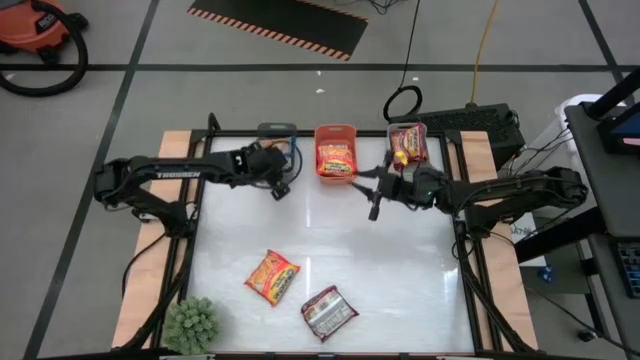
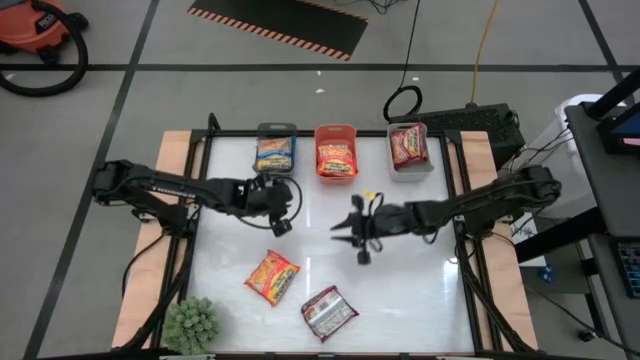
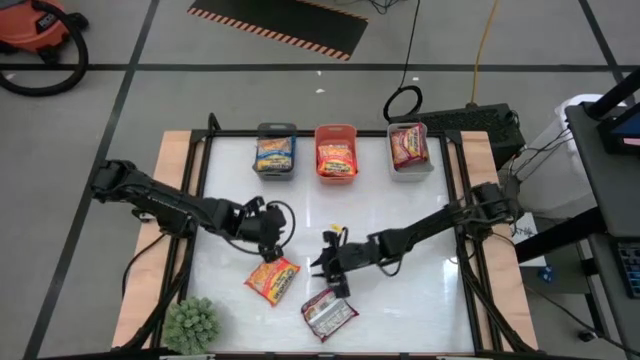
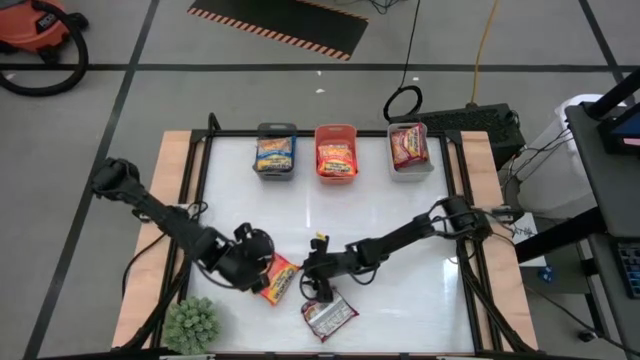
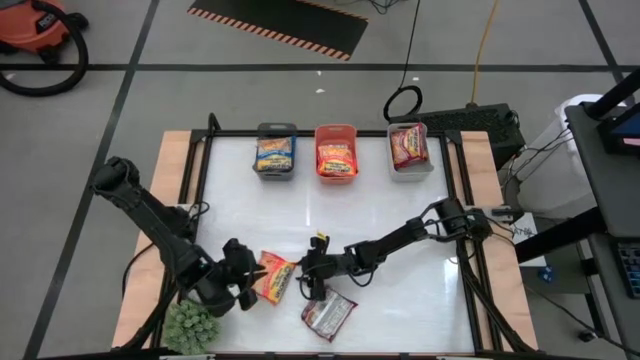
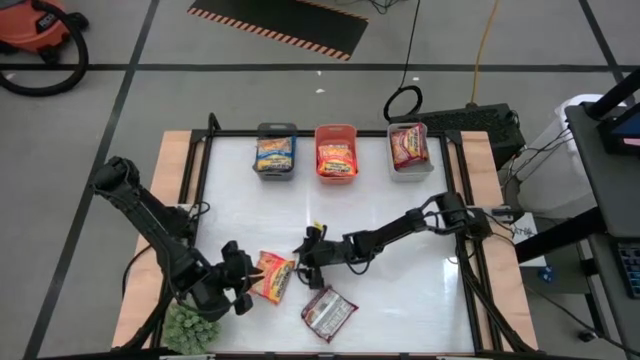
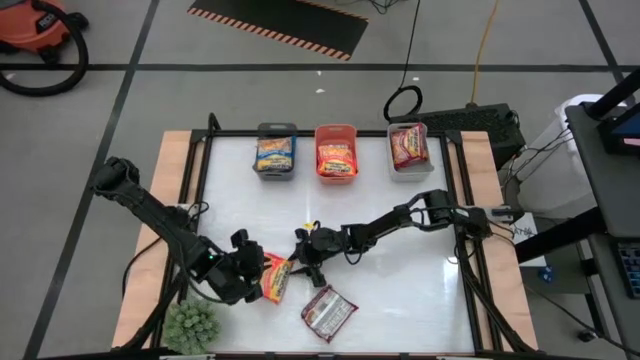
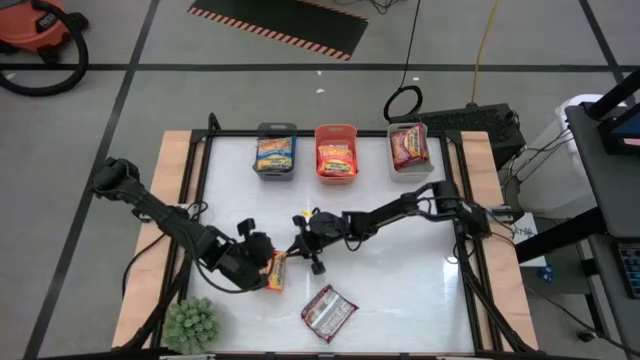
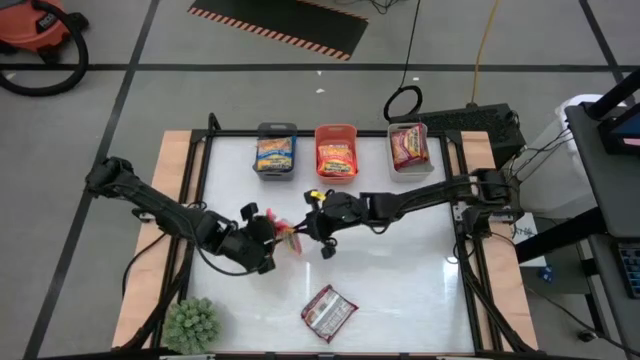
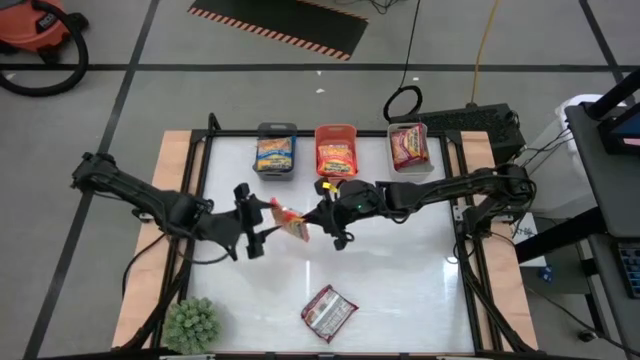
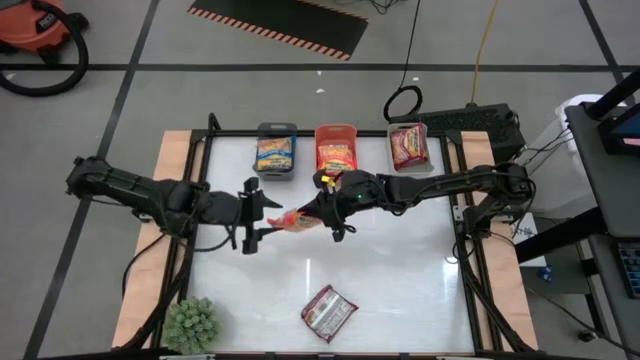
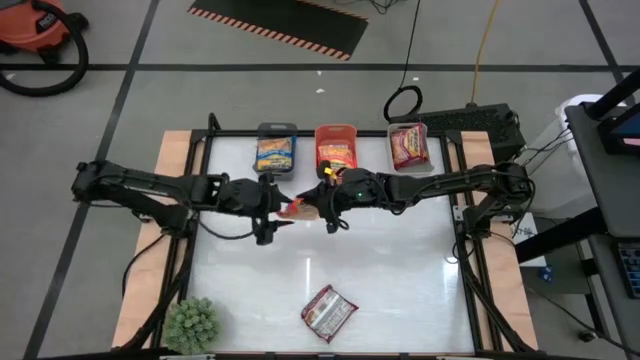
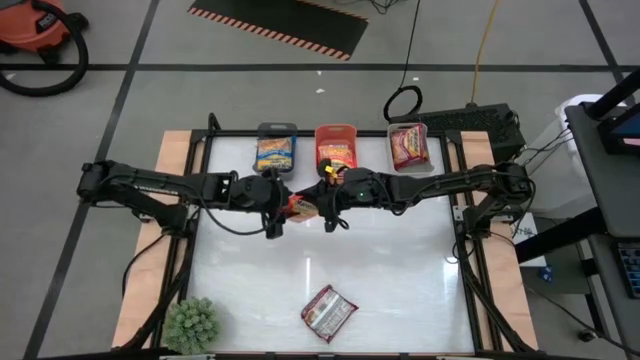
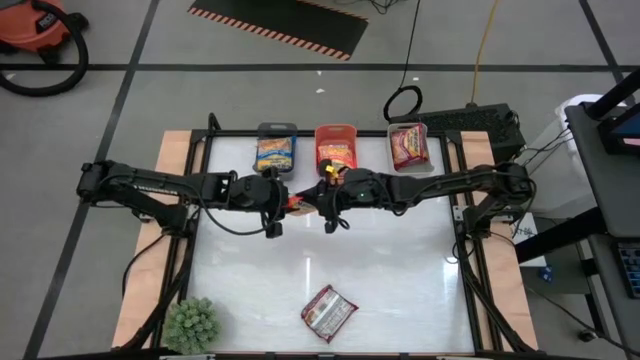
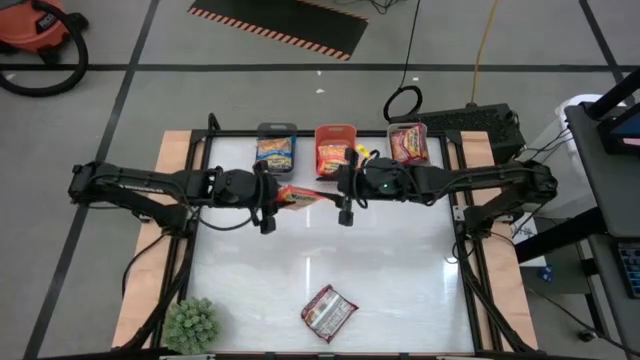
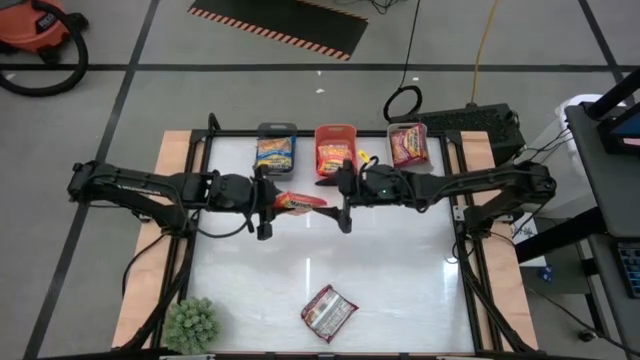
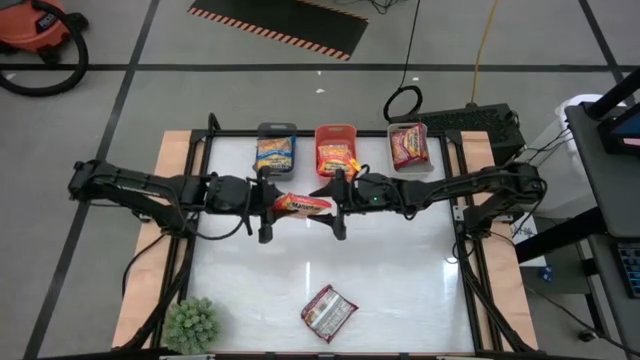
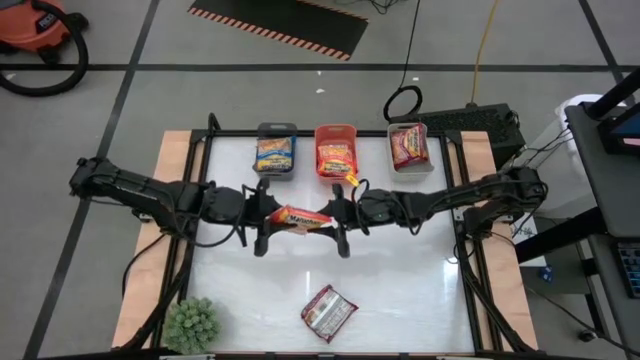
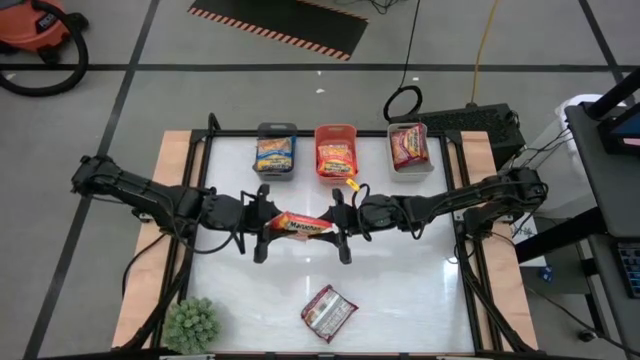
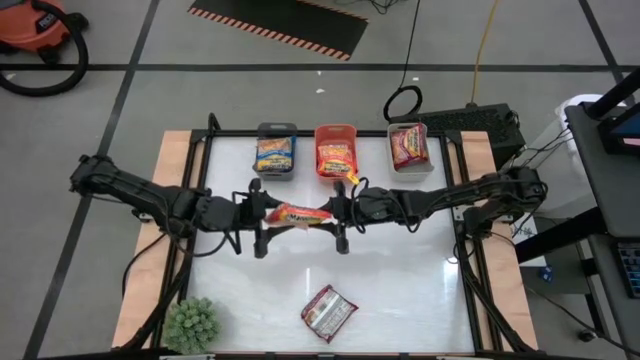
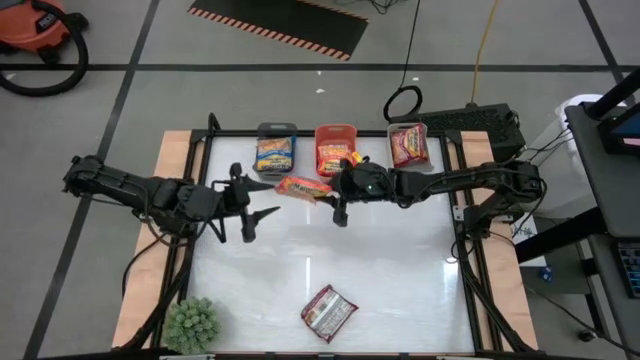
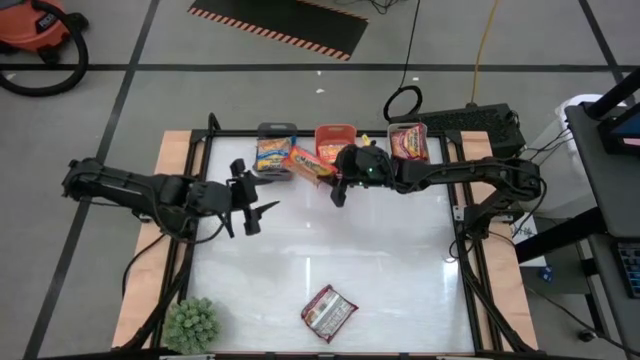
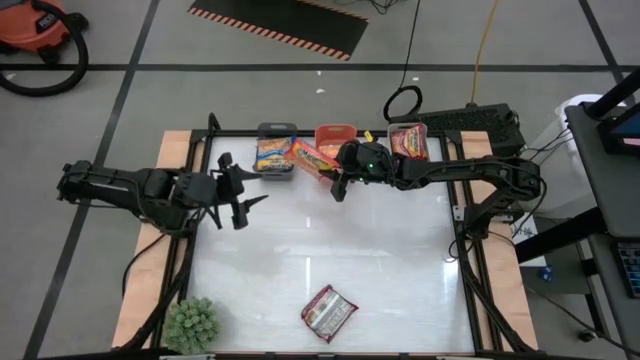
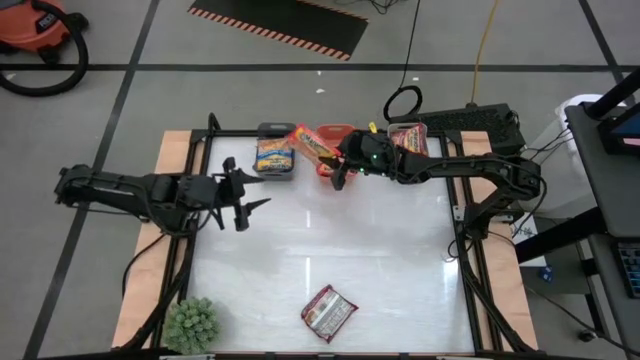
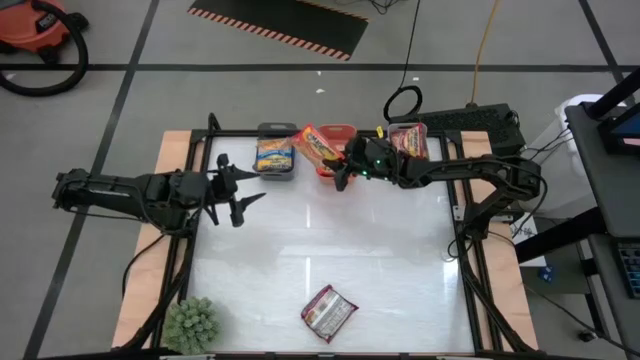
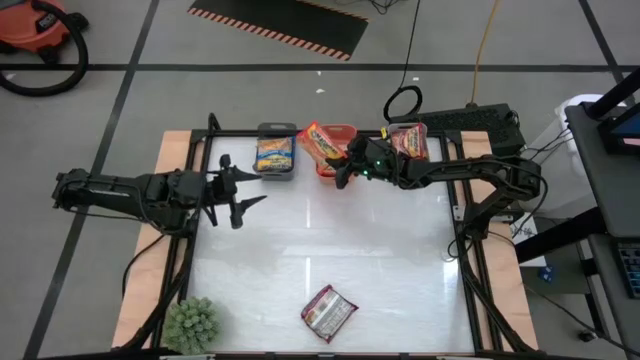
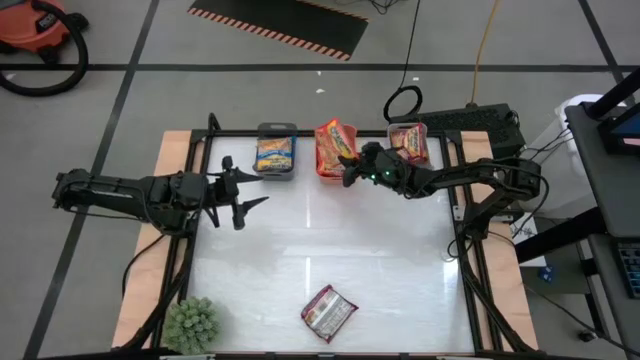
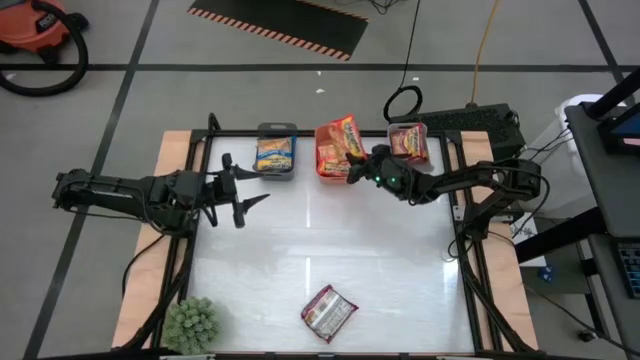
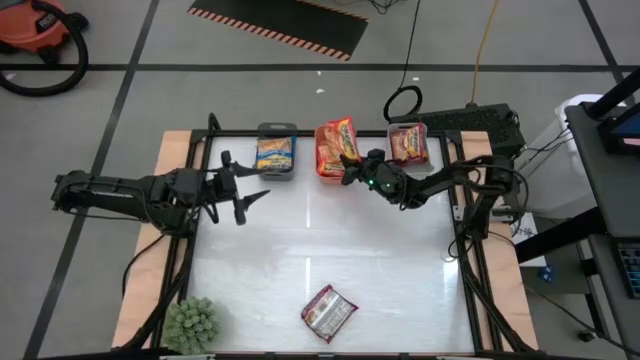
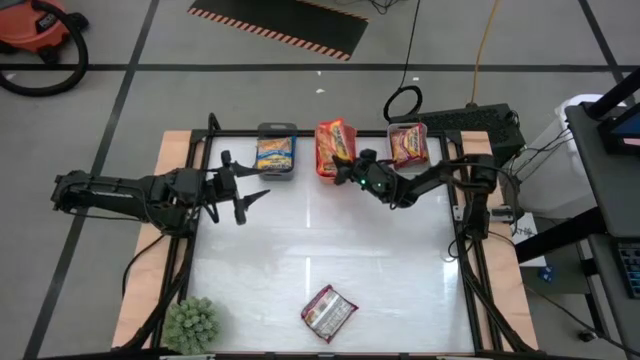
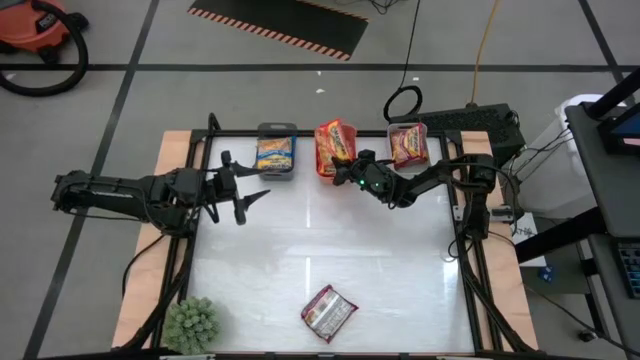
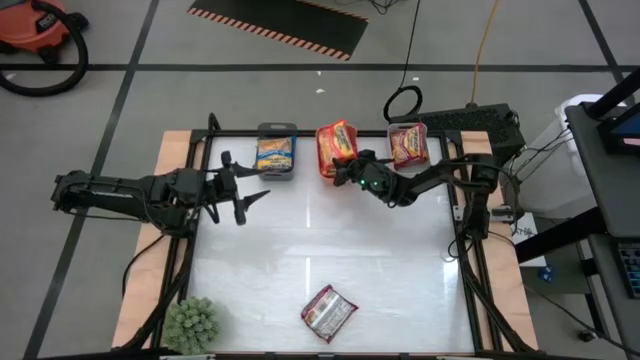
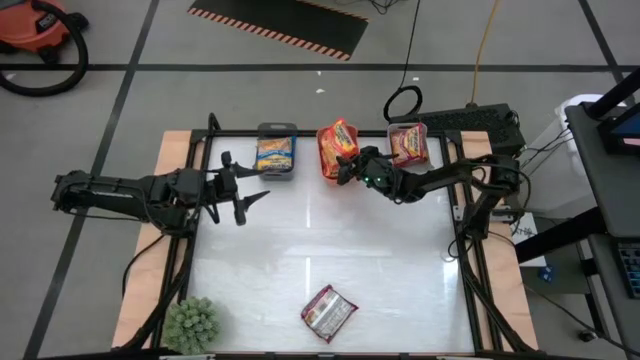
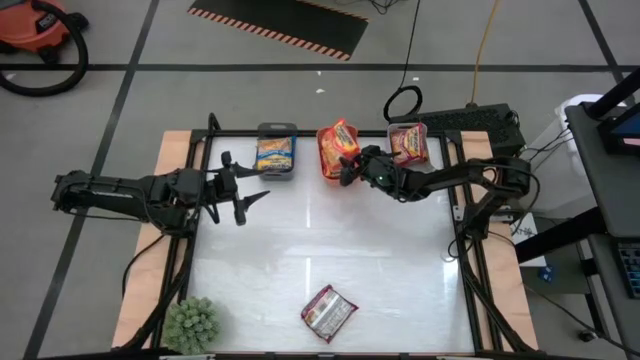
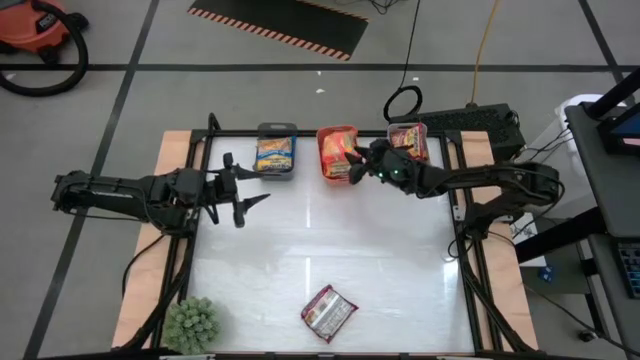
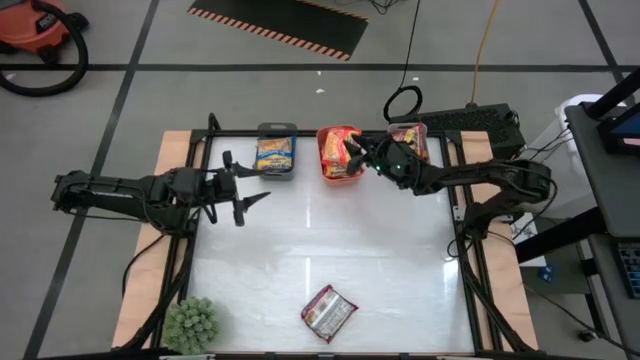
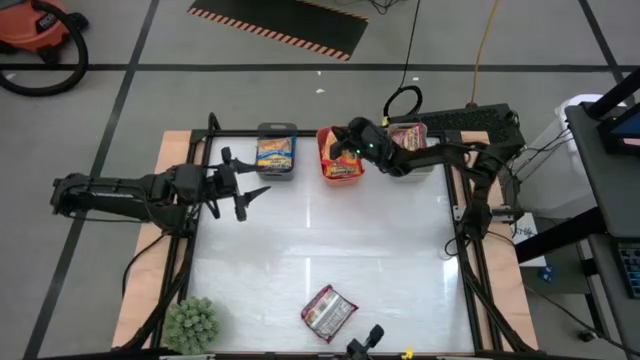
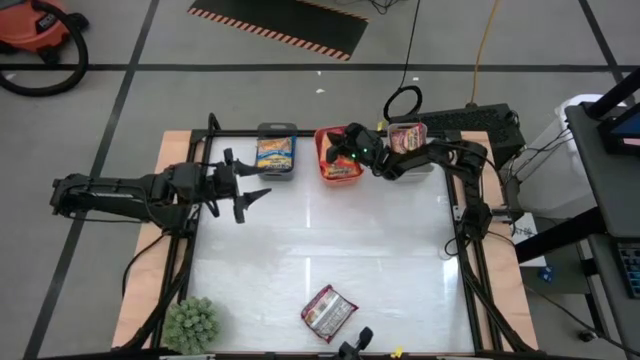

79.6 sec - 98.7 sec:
Task: Sort Maruchan noodles
Put the orange noodle pack into the orange bin

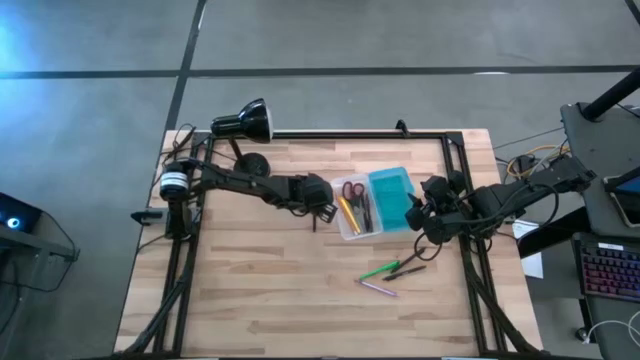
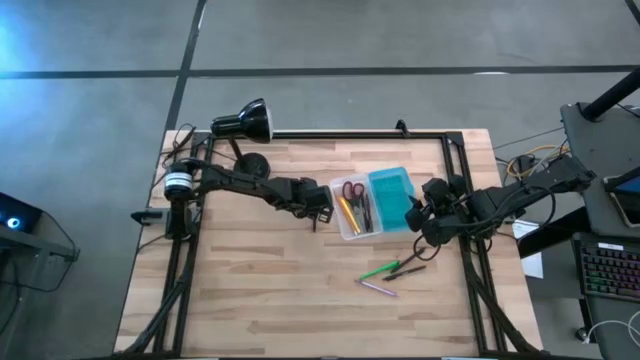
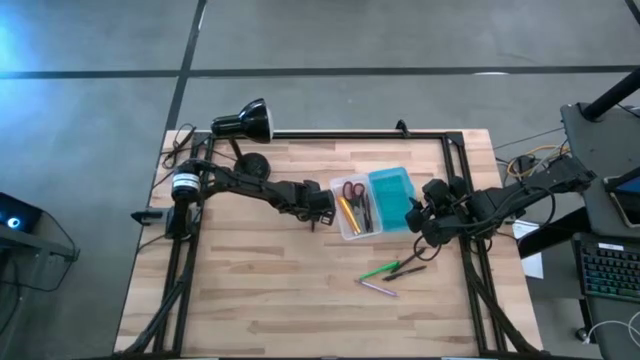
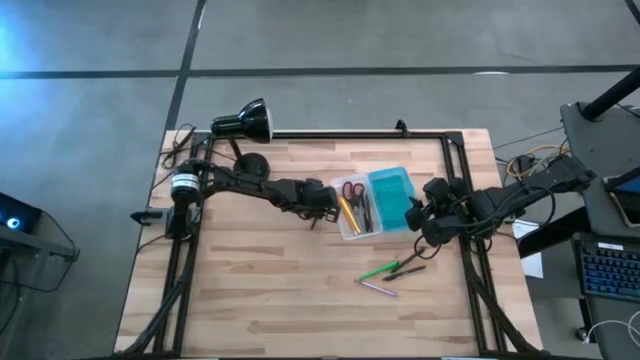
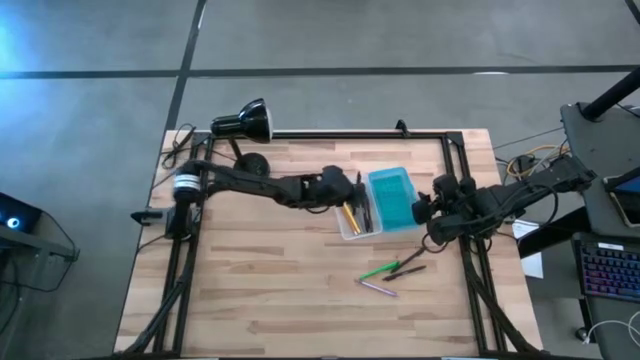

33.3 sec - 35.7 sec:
Task: Pick & place school supplies into a supply box
Put the black pen into the blue supply box

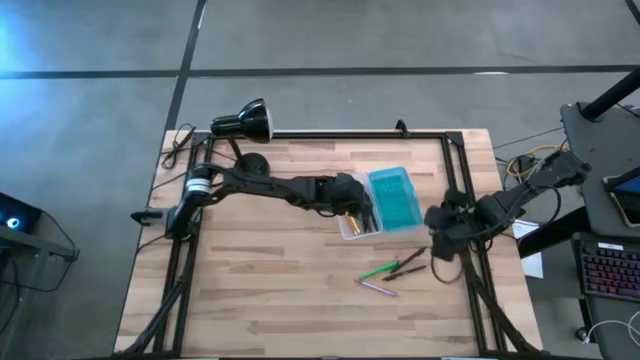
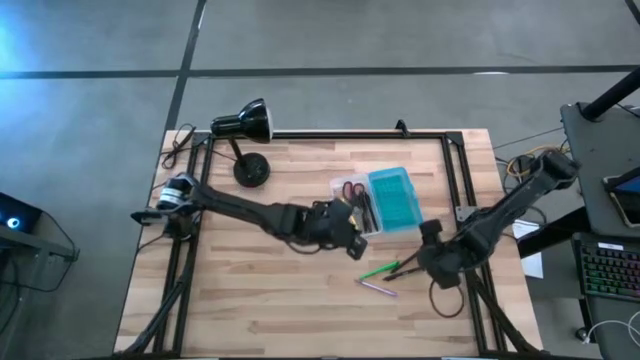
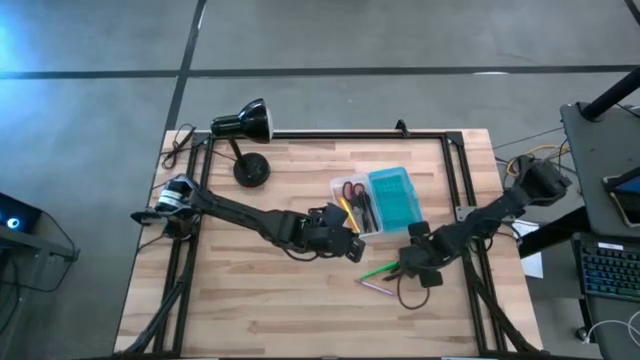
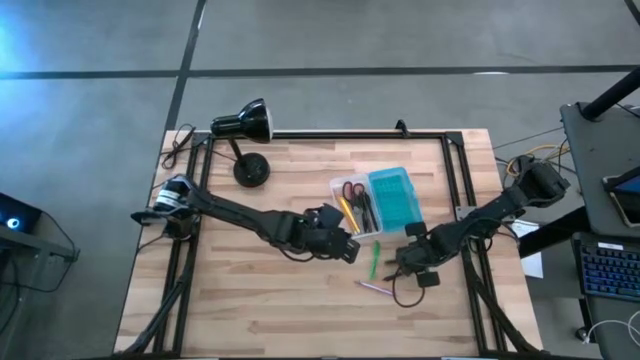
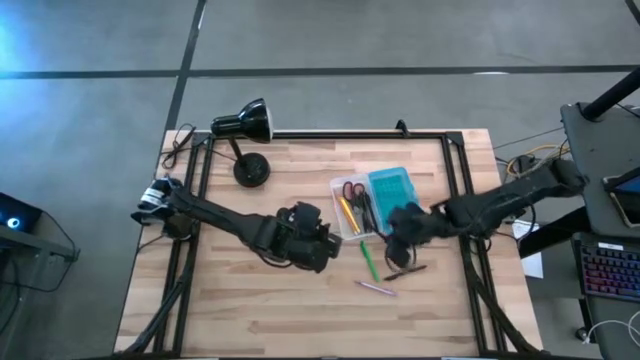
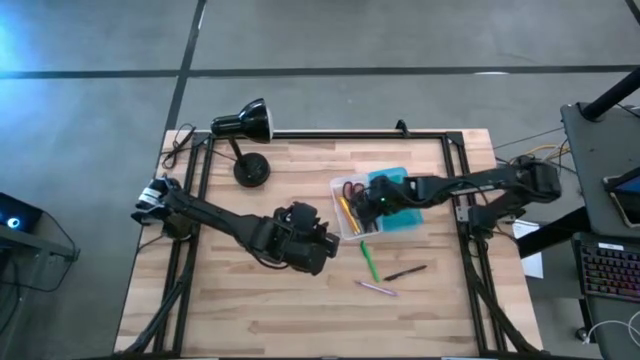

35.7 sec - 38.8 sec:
Put the black pen into the blue supply box
